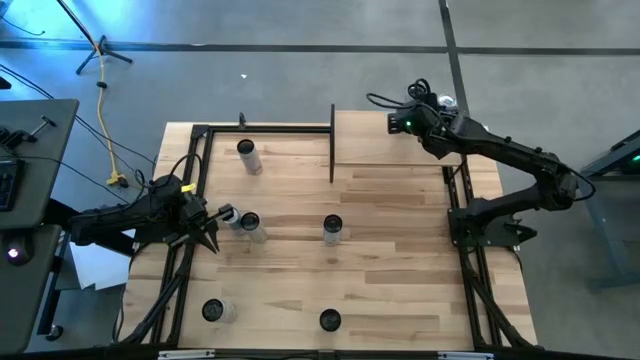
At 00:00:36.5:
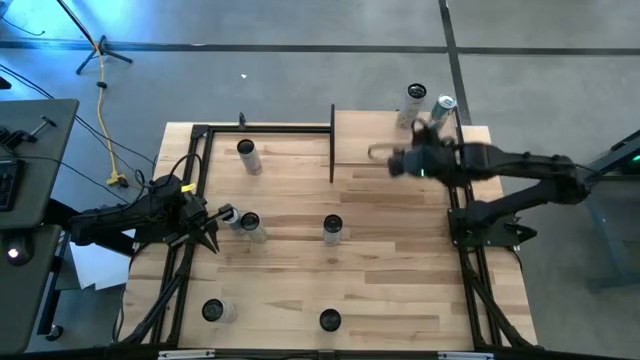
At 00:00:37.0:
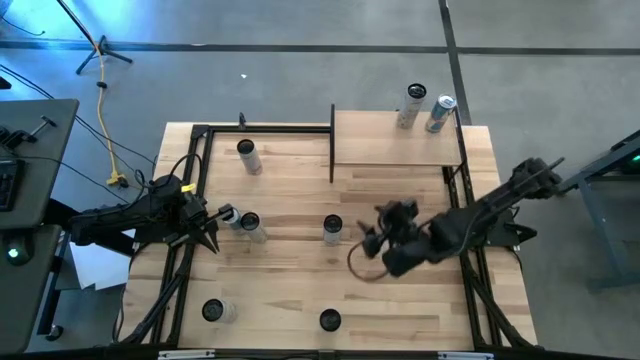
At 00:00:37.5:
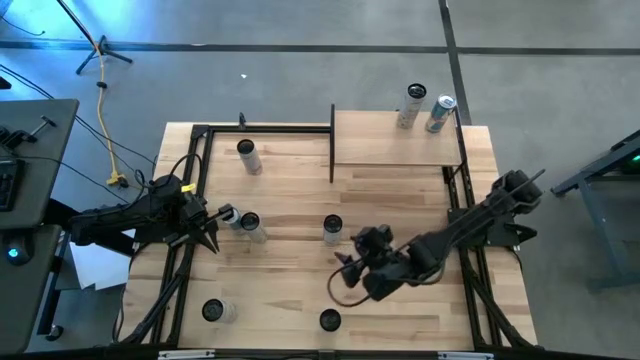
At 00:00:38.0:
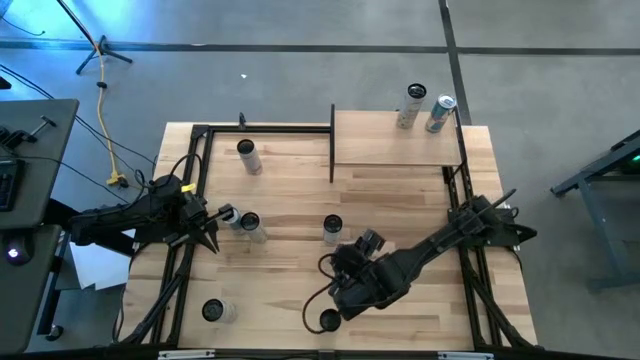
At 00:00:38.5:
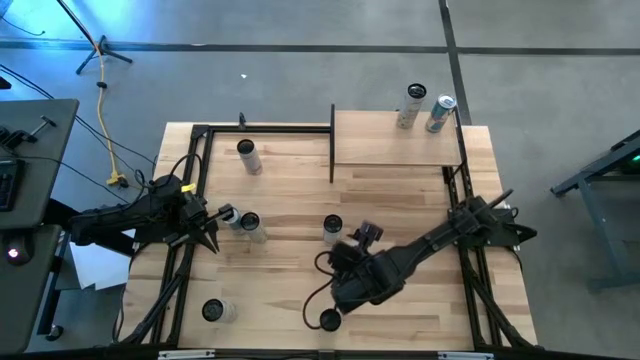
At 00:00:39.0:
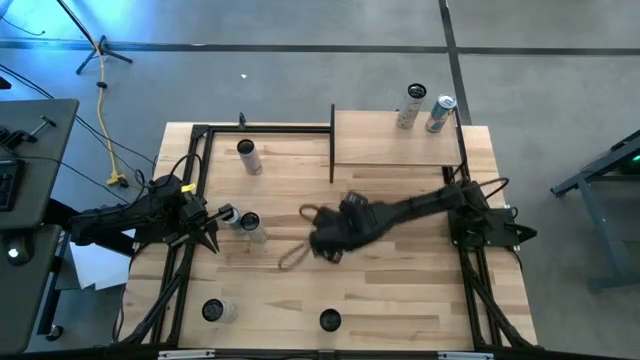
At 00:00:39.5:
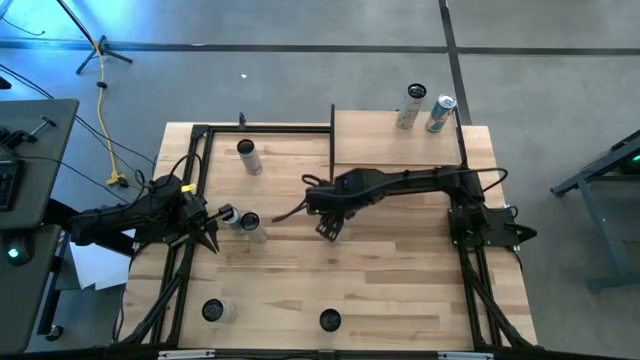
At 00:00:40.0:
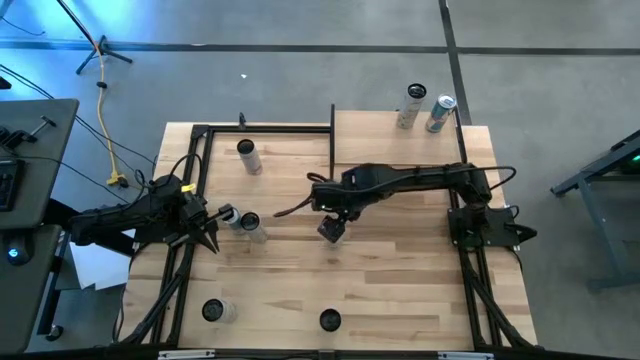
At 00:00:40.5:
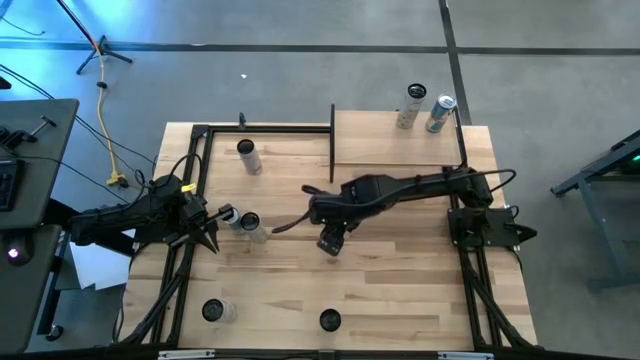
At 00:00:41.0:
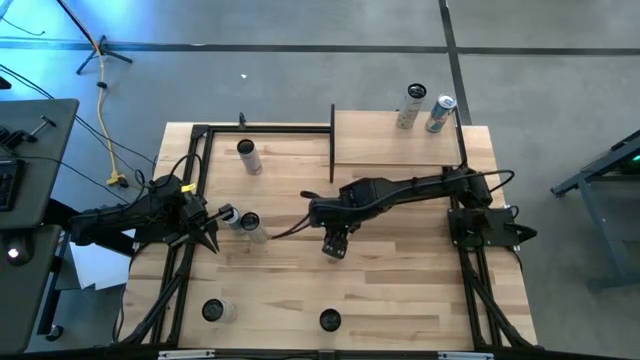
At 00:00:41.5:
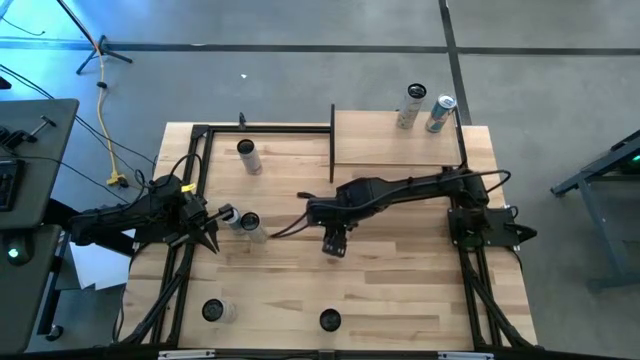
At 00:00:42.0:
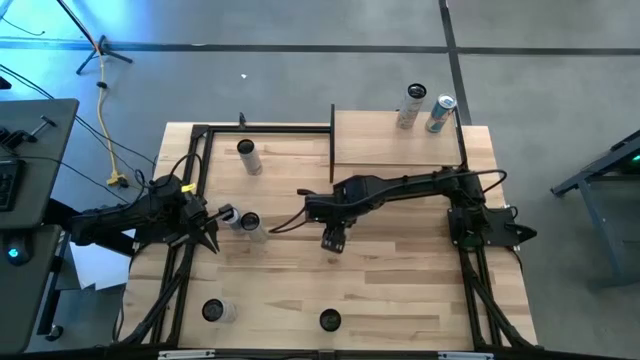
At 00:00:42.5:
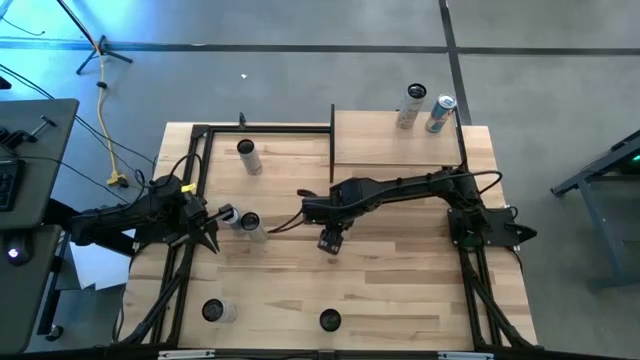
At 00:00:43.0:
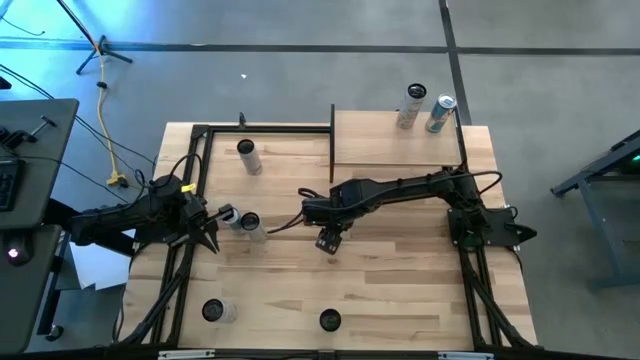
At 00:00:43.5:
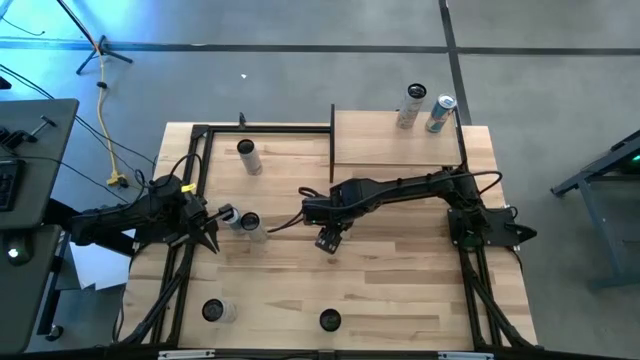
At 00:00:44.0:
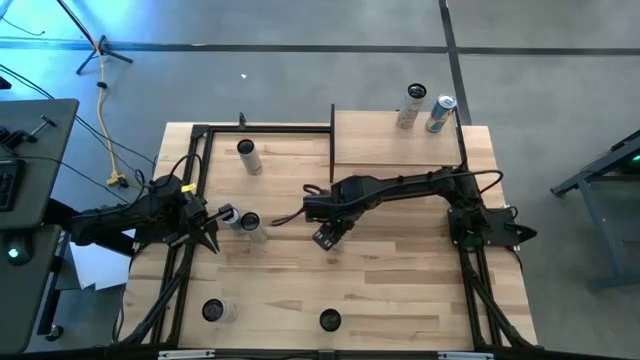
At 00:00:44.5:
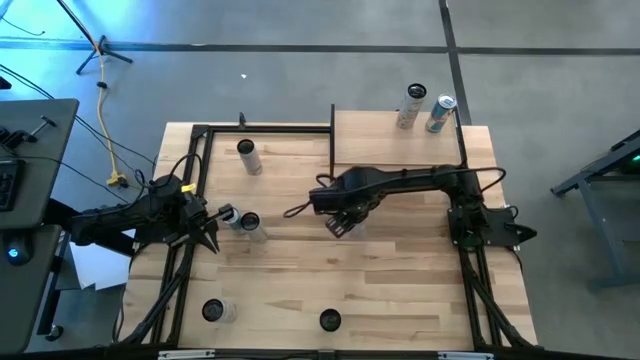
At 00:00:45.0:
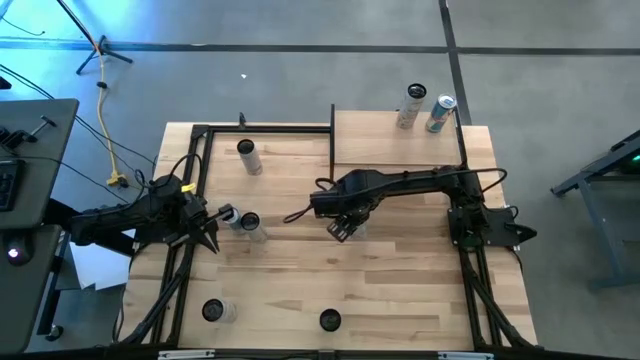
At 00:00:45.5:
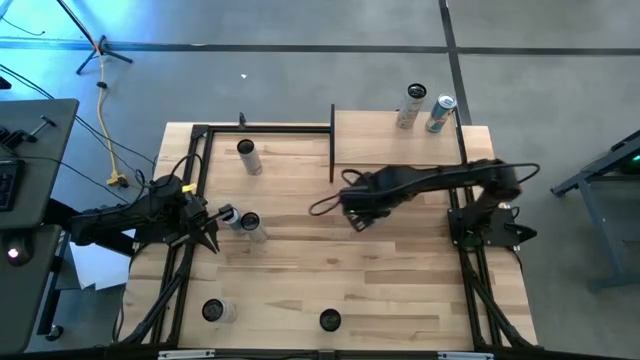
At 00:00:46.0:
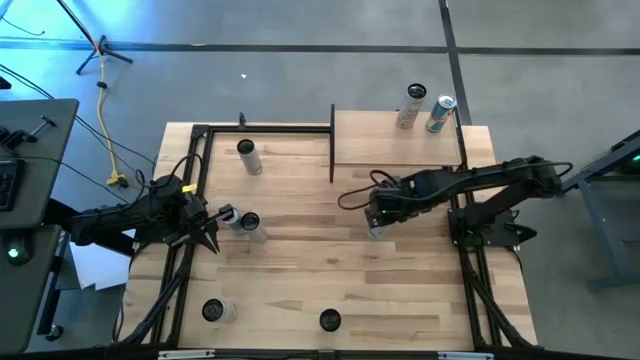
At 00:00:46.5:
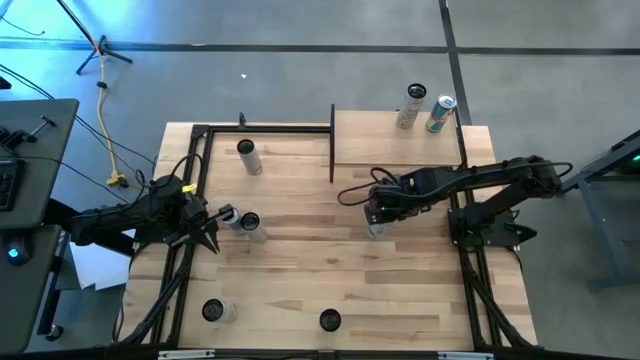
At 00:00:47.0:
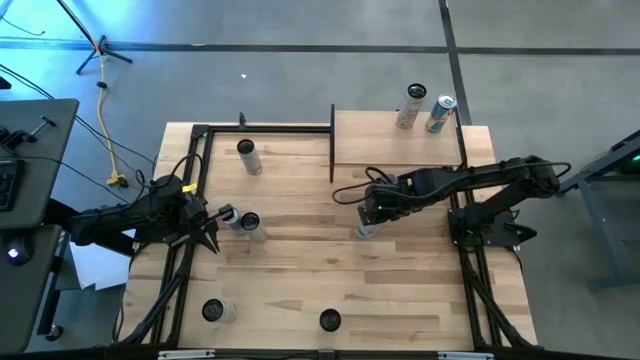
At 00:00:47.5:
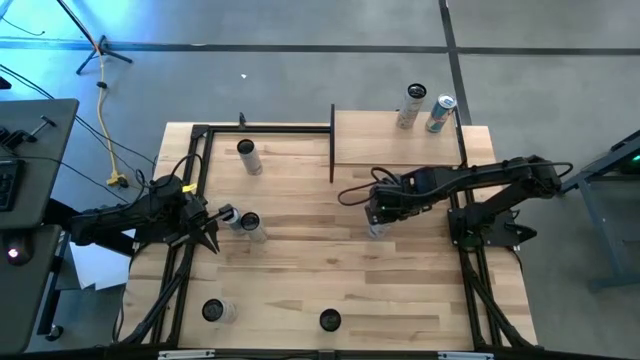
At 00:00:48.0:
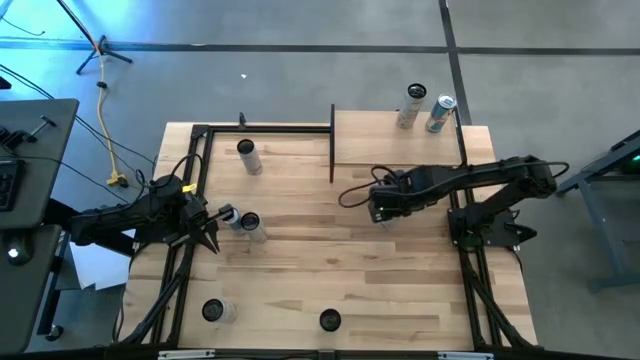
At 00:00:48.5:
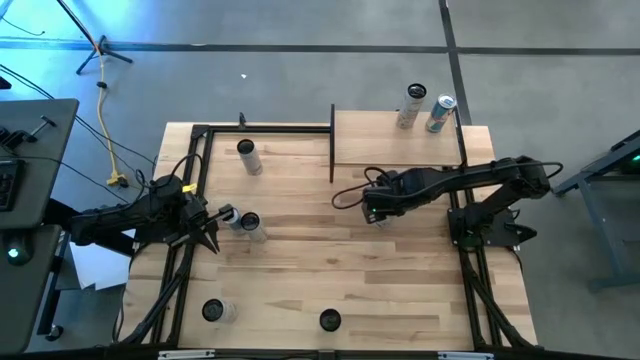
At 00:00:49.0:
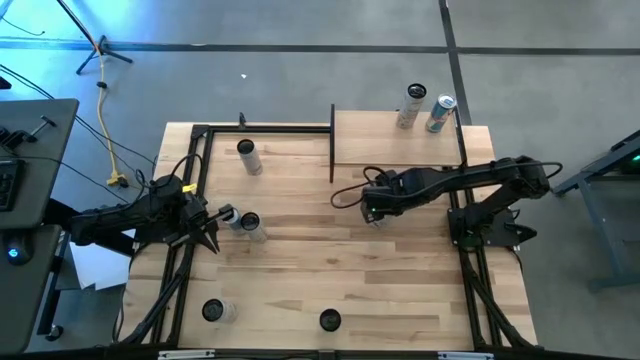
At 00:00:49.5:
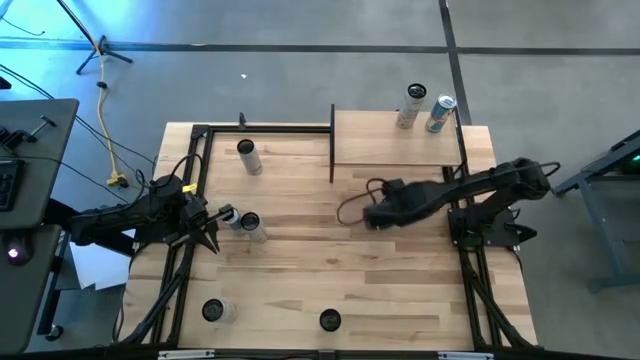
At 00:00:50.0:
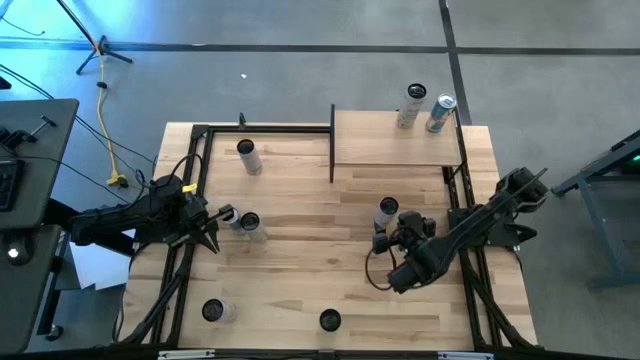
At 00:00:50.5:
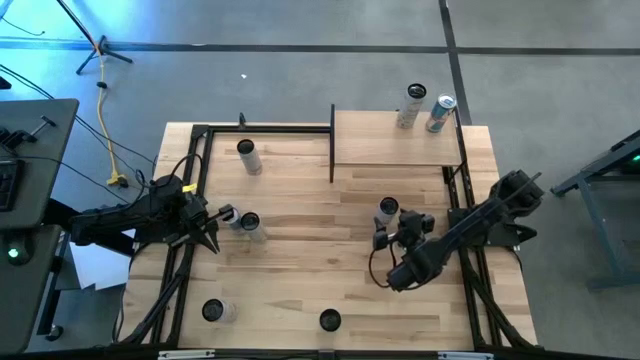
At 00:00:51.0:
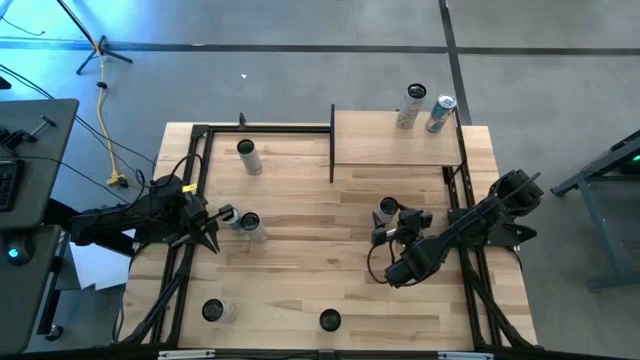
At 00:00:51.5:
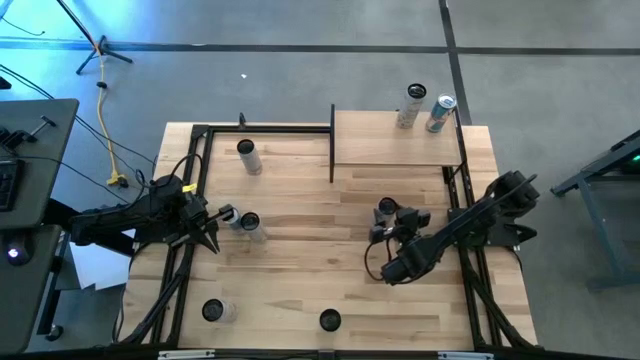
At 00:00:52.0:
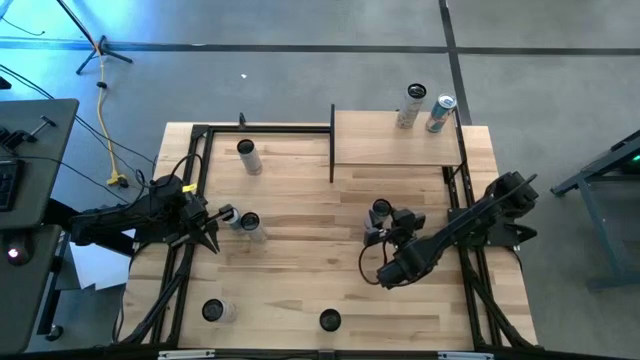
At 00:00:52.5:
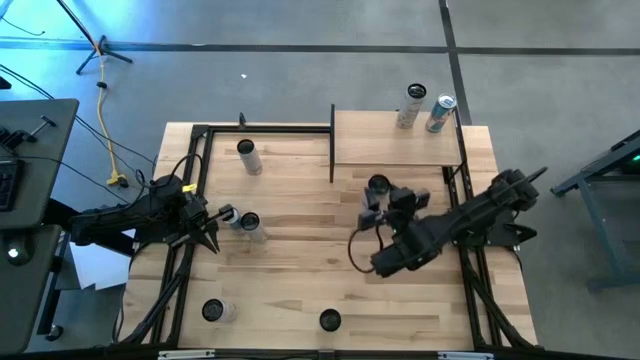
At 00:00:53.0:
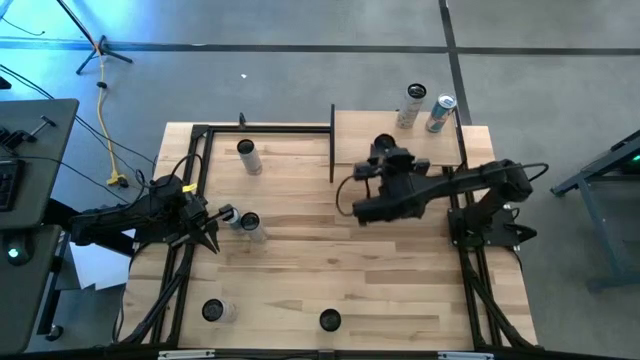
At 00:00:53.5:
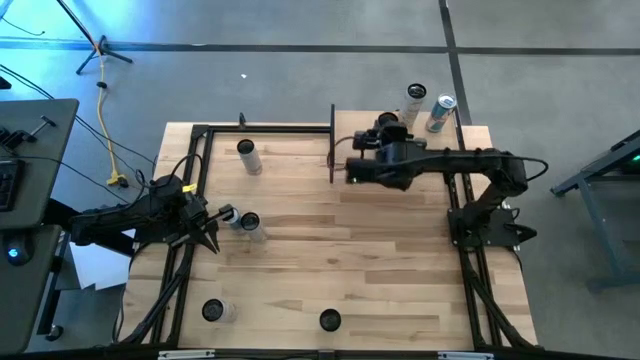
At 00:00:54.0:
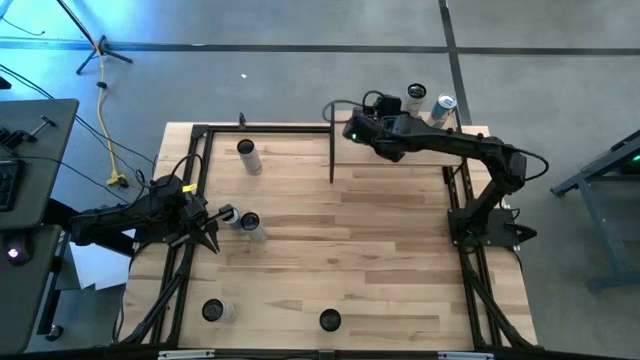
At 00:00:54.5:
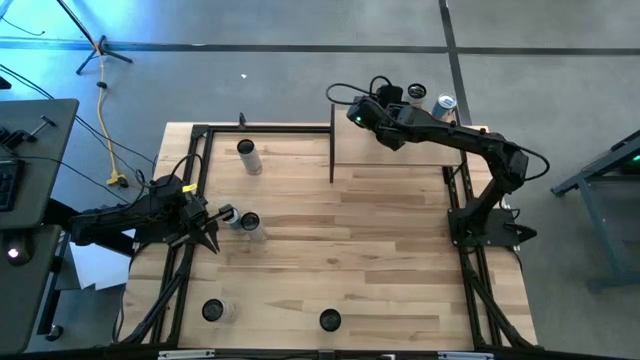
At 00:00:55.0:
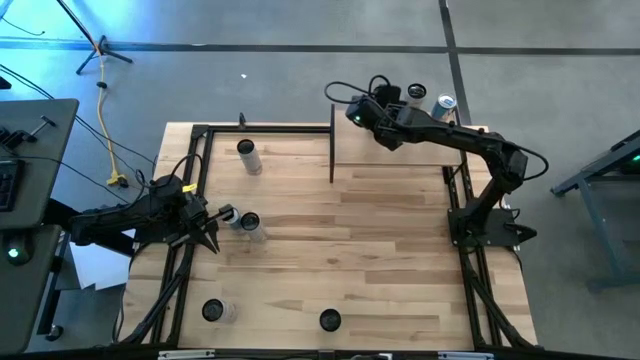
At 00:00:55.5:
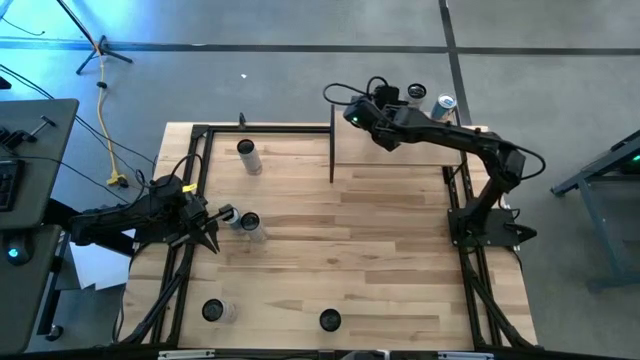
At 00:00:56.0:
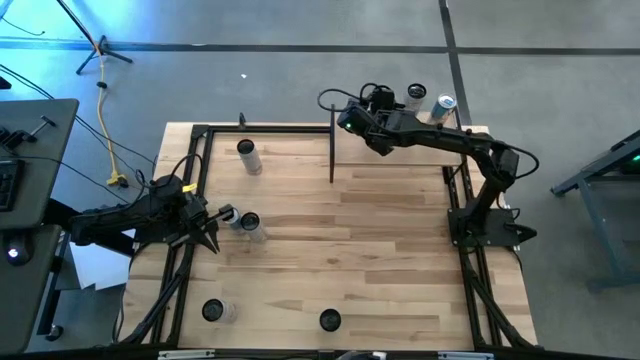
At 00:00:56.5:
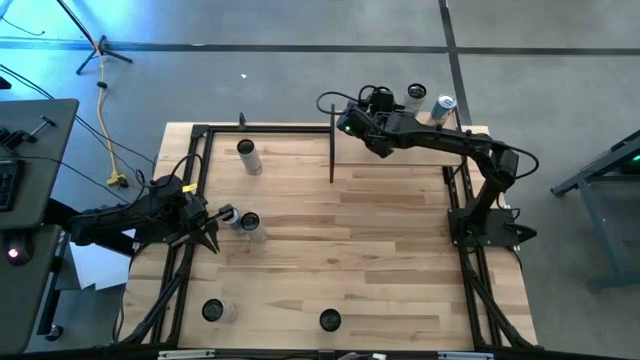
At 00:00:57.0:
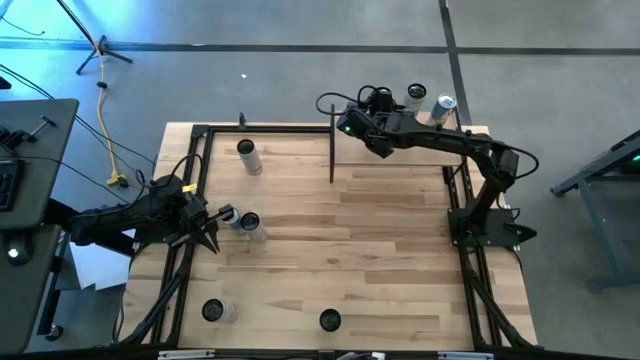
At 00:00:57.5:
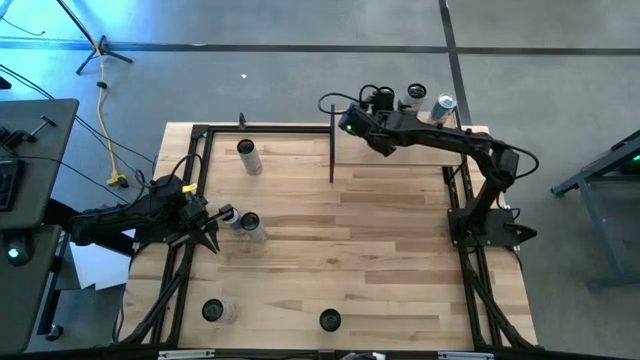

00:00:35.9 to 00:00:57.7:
Task: Place canned beverage on shelf
Put the top white blue soda can on the shelf
